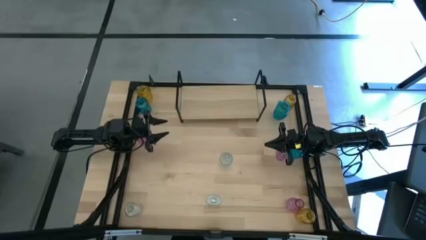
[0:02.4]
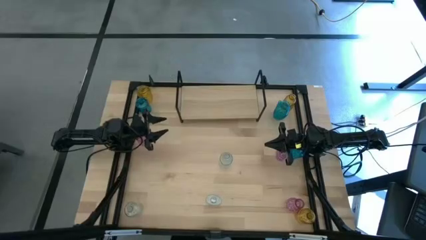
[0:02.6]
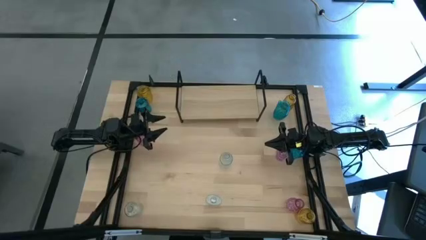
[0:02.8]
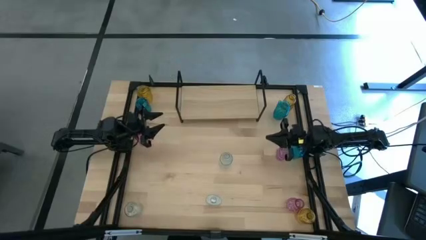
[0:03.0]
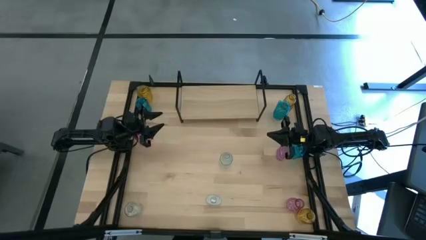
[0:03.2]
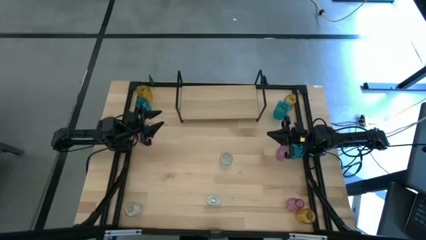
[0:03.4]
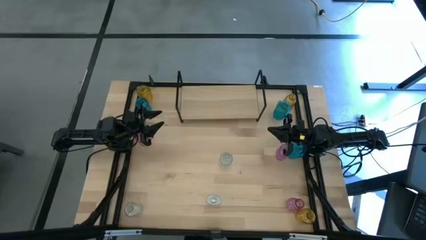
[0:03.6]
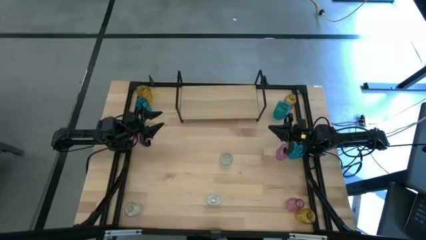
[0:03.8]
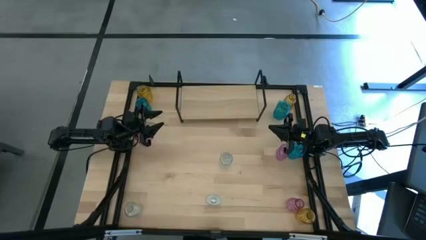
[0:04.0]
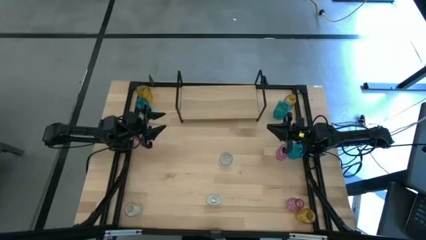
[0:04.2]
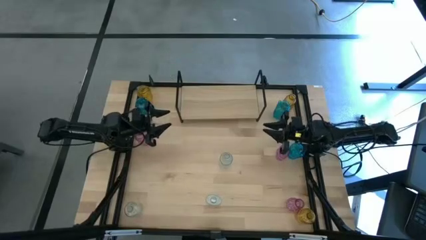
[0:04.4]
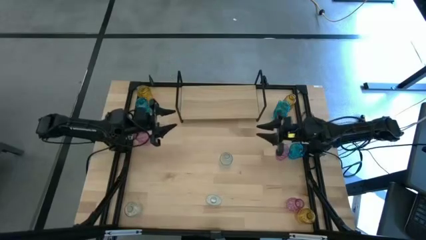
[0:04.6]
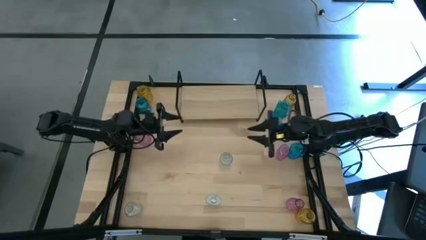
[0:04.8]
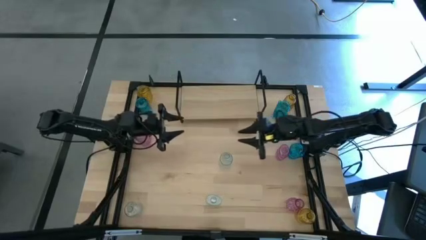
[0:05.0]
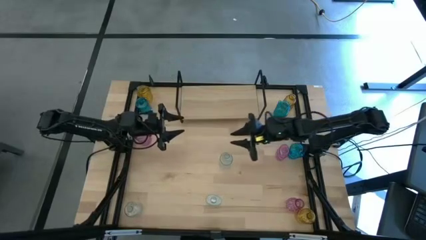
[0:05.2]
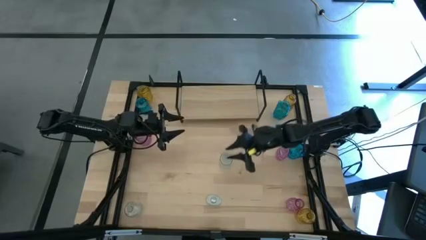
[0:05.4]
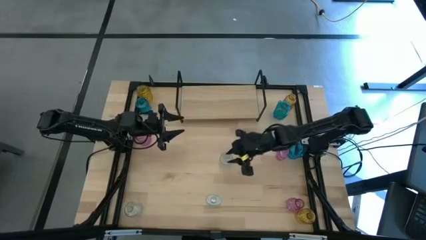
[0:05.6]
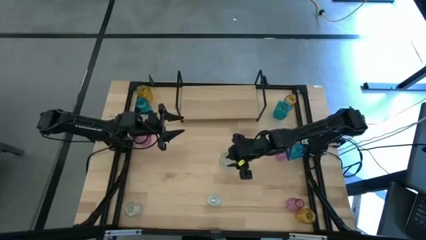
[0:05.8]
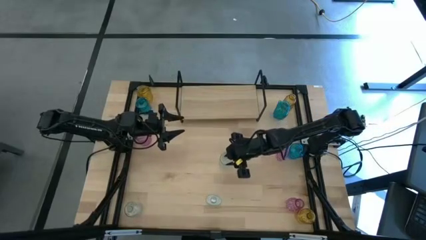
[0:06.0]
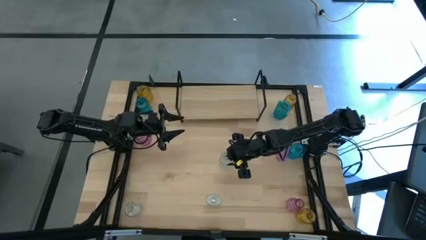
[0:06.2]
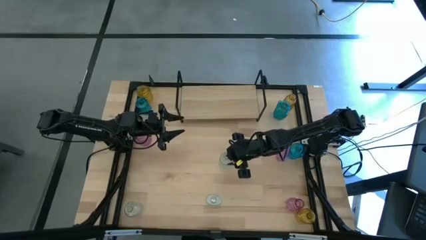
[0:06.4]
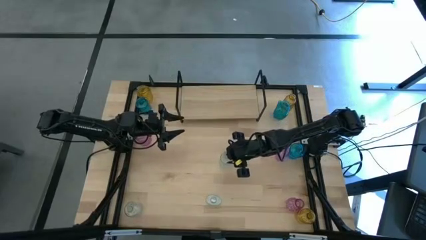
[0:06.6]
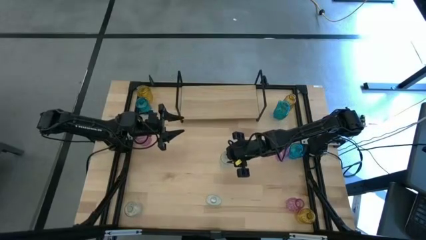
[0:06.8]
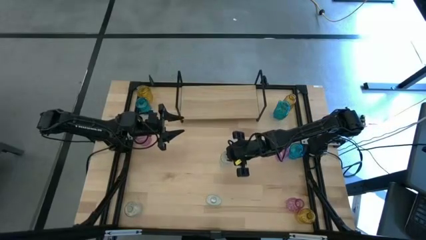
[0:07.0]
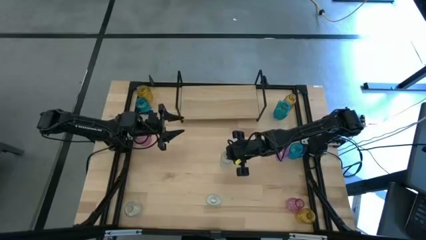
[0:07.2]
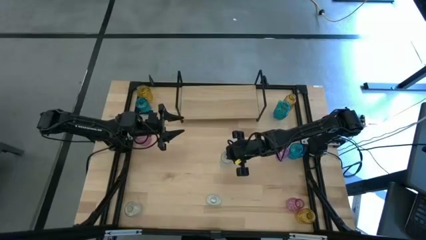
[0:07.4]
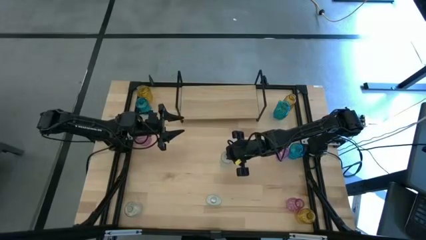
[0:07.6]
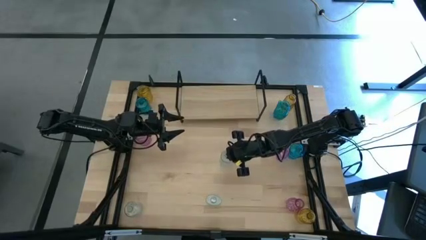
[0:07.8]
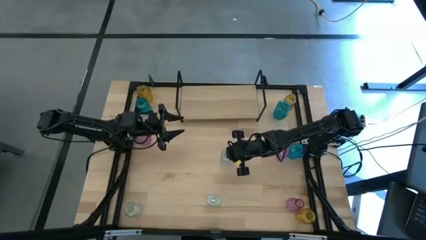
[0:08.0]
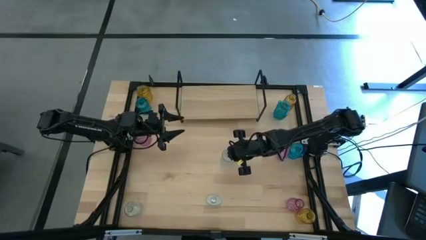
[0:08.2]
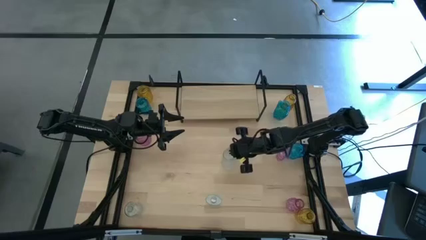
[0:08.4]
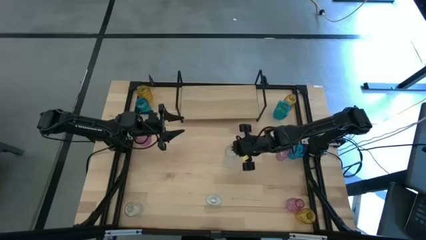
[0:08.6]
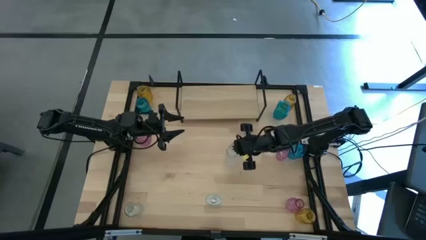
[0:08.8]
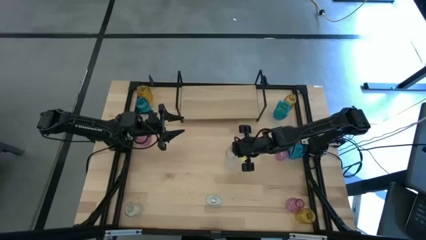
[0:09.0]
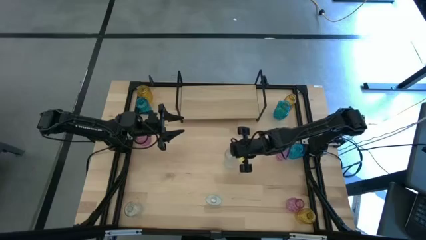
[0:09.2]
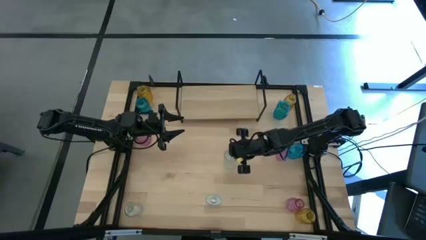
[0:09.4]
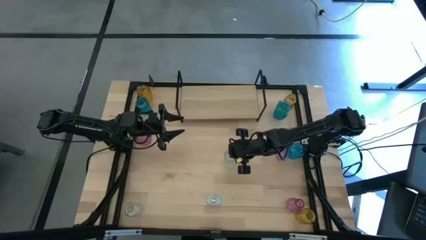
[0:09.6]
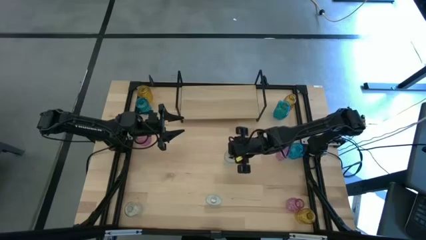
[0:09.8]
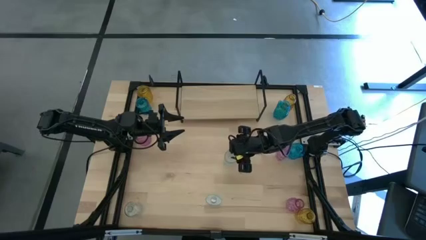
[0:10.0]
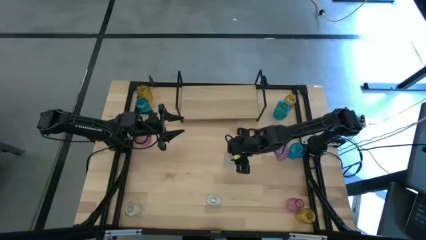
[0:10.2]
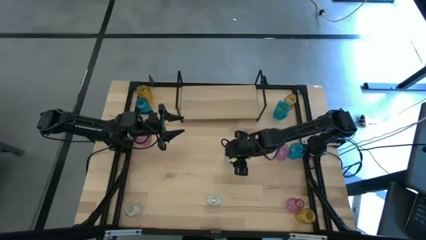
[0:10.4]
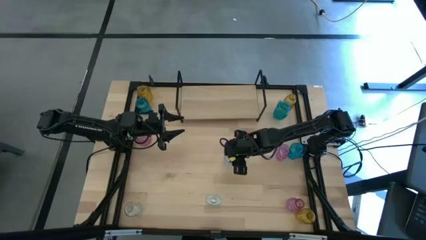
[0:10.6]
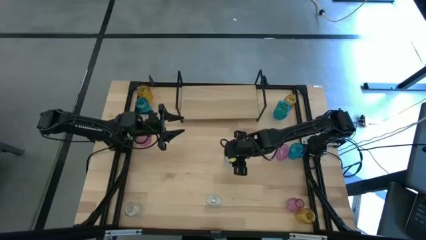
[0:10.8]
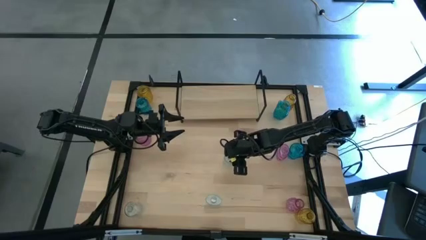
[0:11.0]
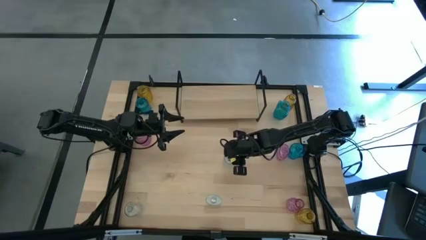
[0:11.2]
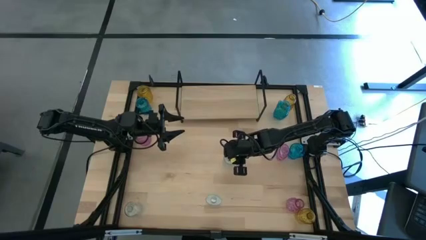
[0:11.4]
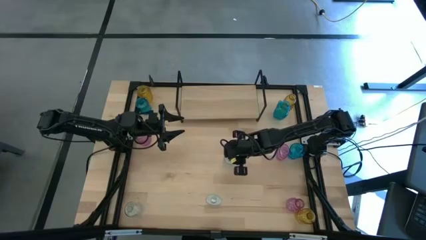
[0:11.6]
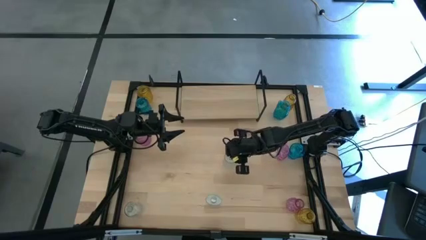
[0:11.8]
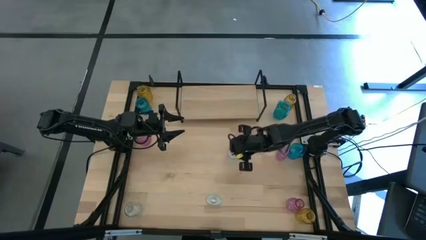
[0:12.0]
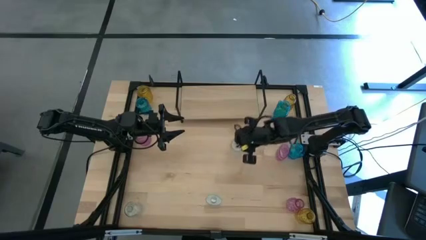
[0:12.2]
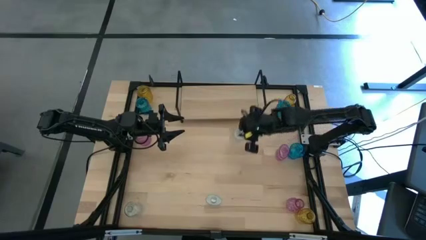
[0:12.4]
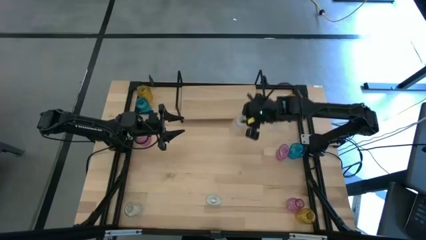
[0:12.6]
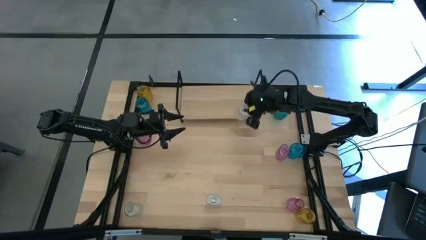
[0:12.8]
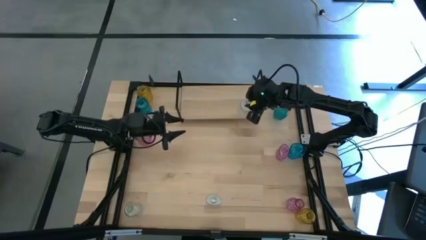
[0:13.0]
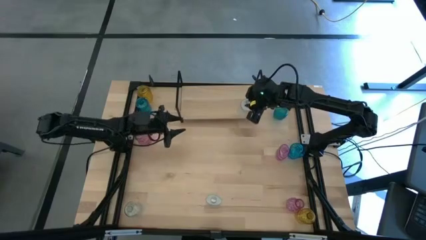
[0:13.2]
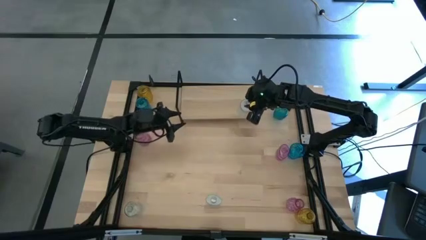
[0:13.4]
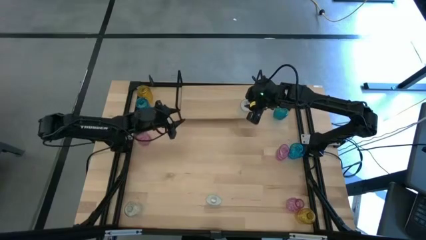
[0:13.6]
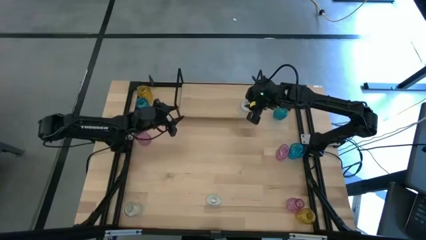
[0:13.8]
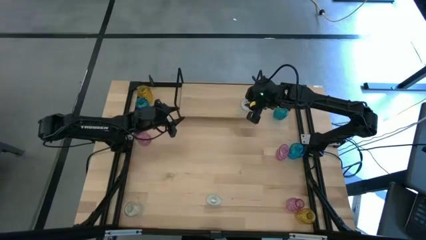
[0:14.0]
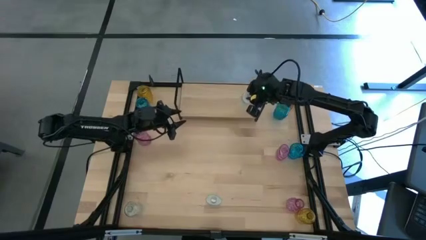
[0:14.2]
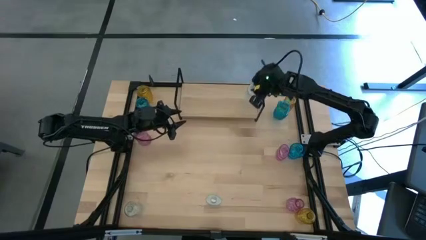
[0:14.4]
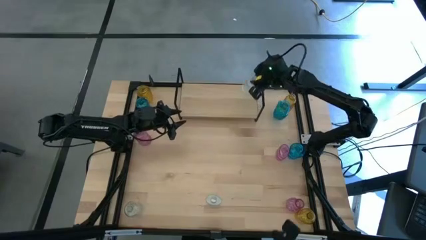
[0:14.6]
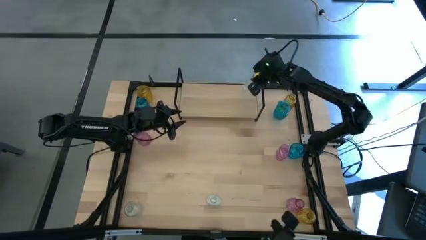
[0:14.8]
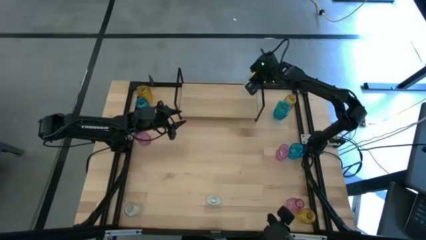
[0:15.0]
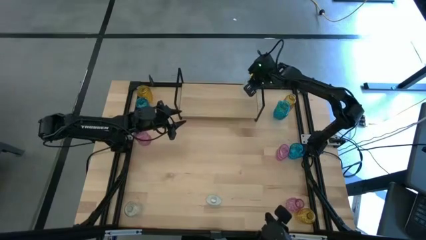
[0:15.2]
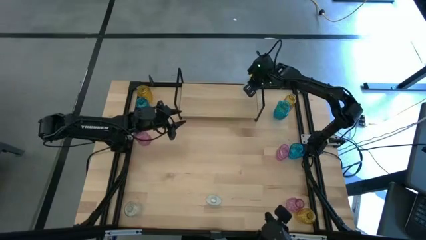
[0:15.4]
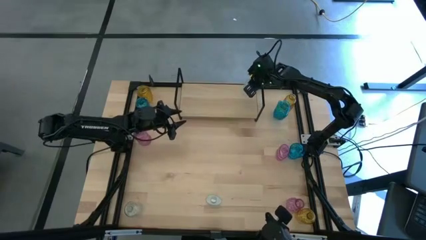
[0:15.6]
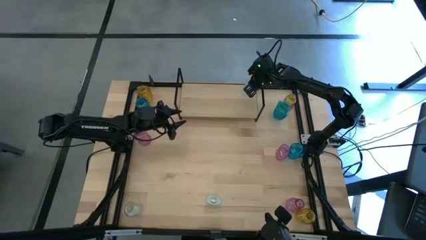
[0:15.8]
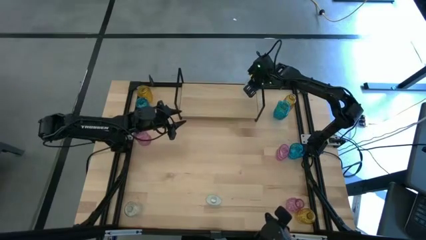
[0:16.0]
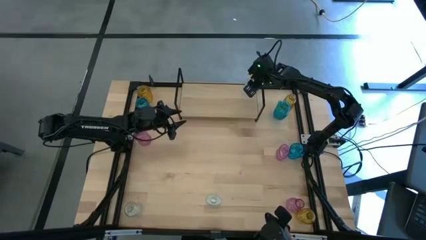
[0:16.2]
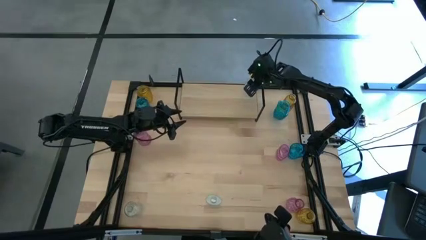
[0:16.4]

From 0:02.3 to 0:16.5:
Task: sort vases onto shelf
Put the top transparent vase on the shelf
